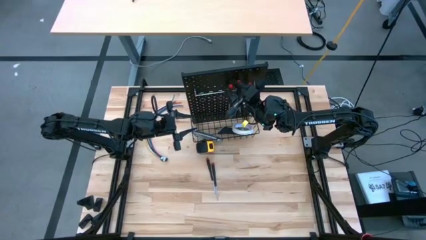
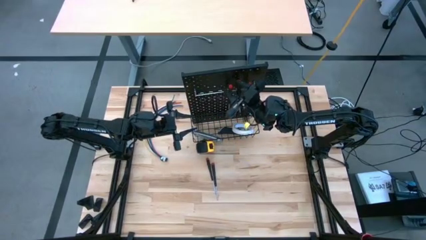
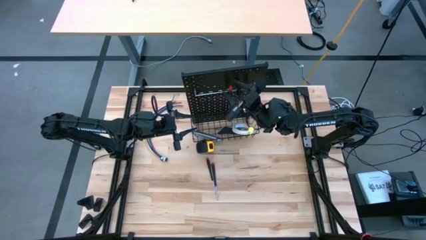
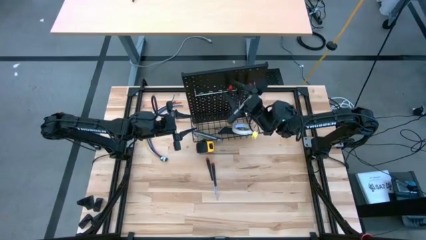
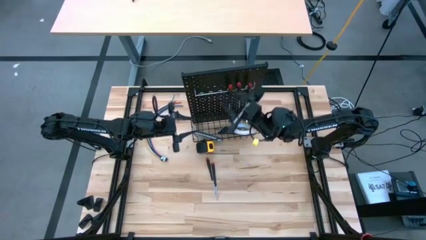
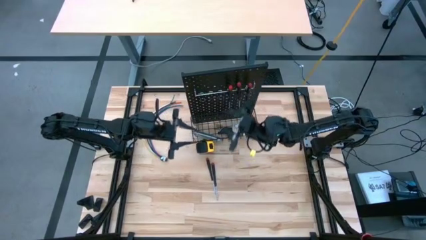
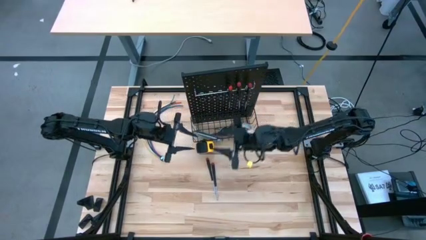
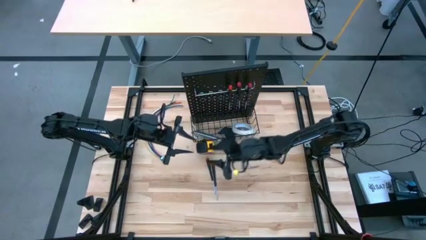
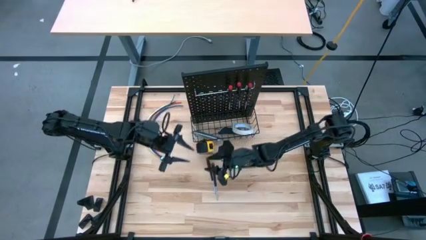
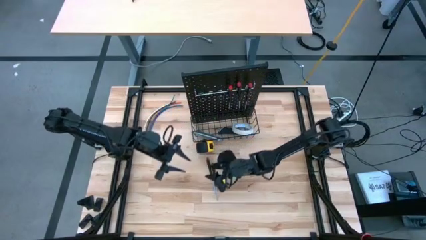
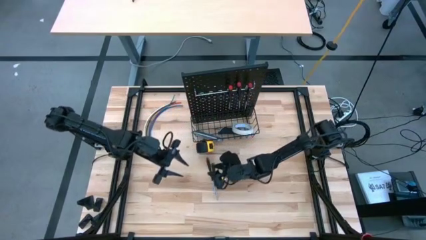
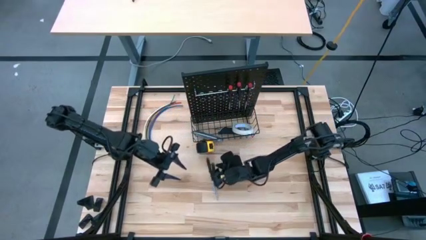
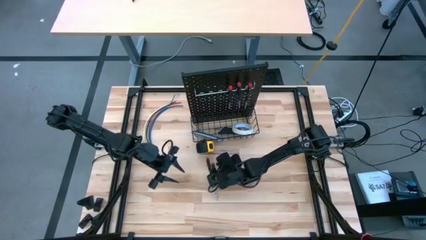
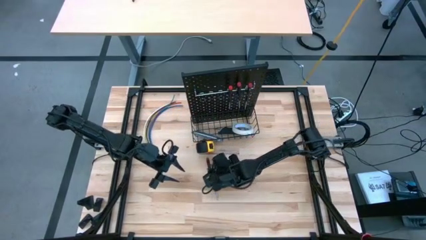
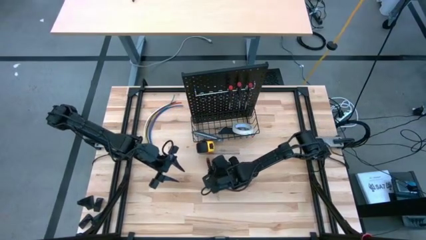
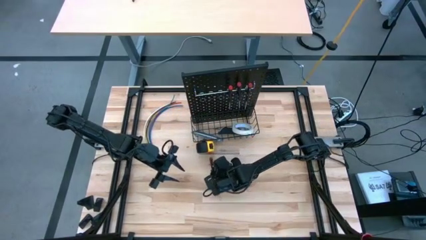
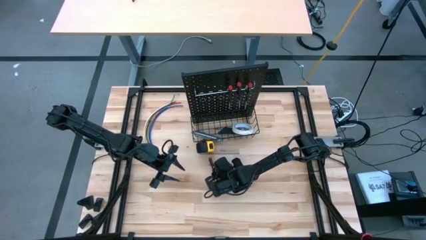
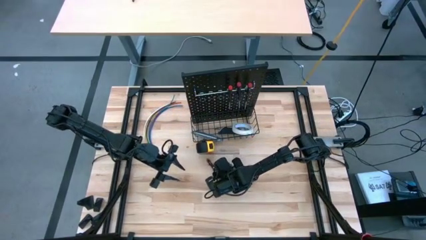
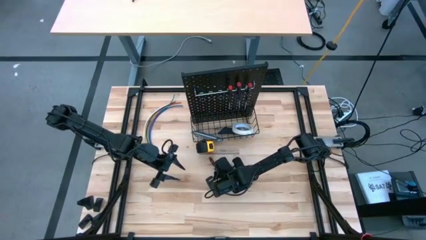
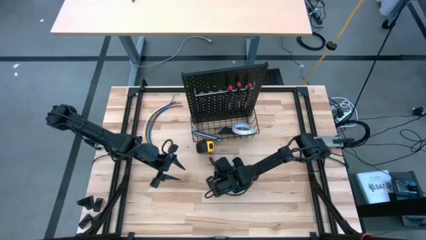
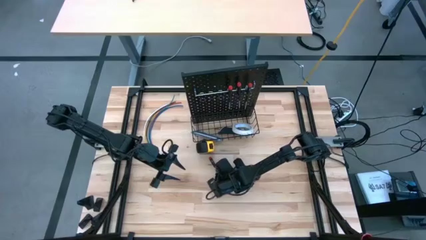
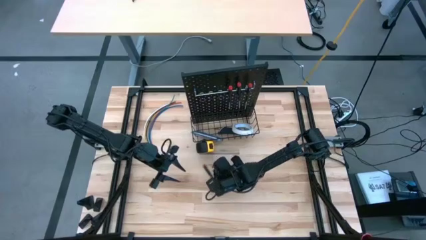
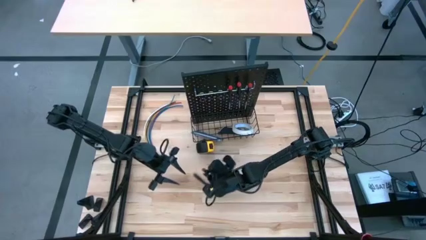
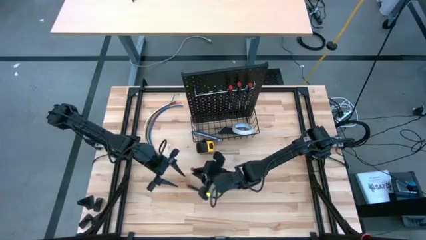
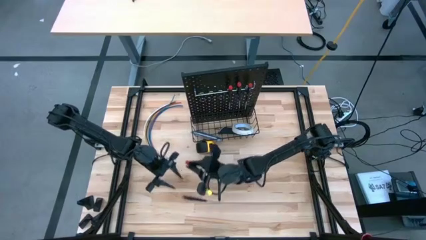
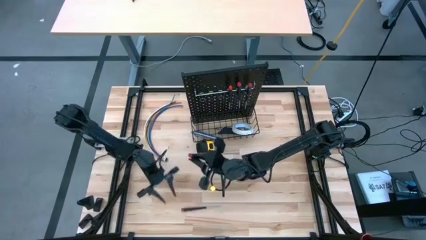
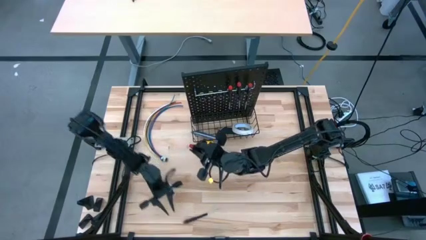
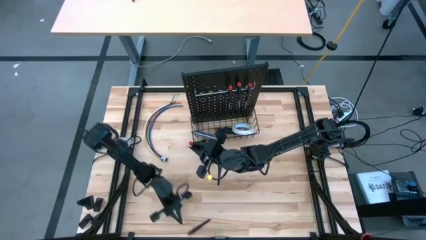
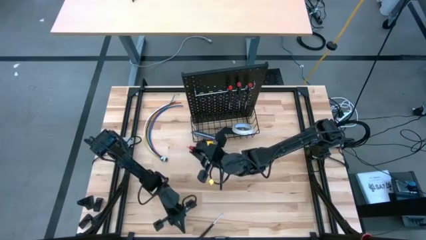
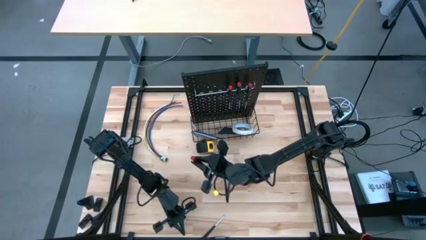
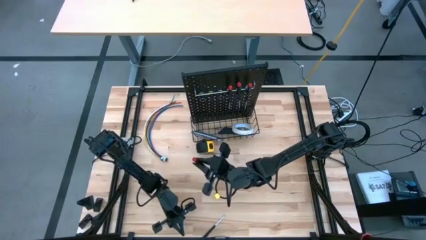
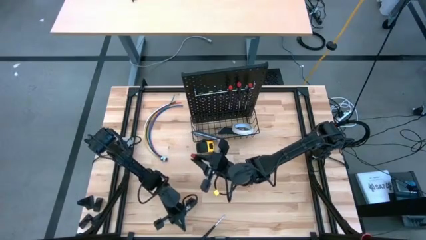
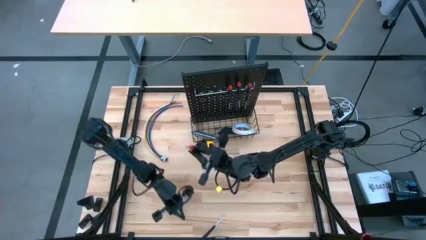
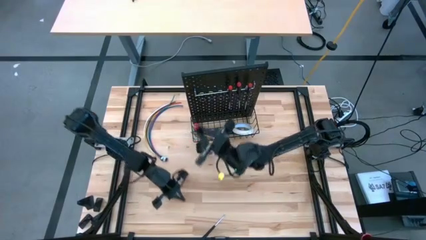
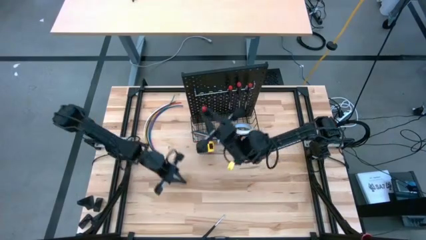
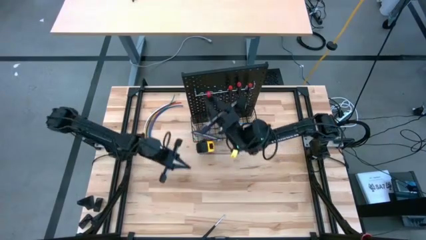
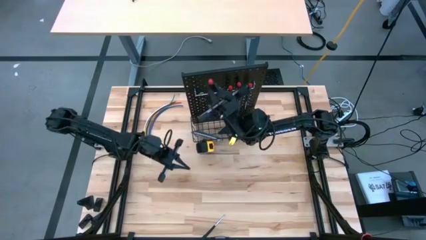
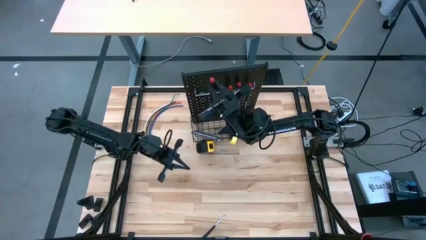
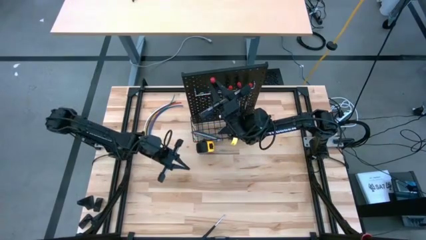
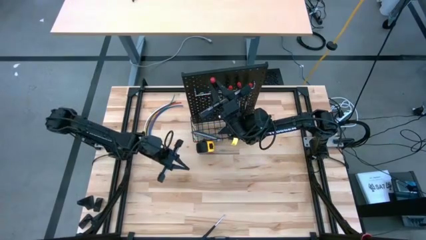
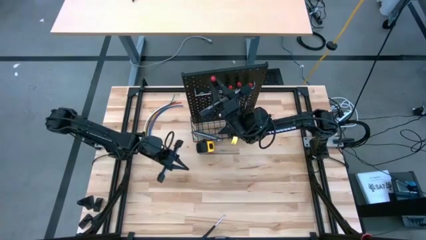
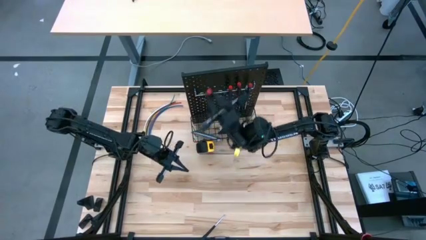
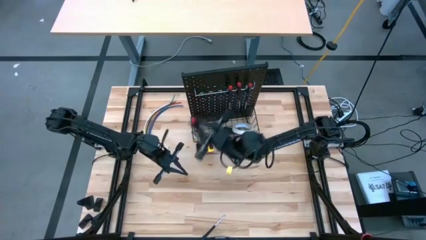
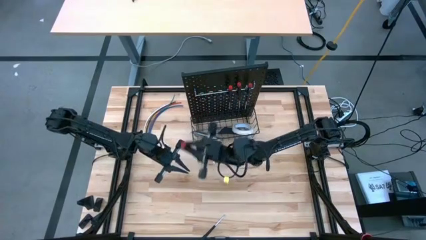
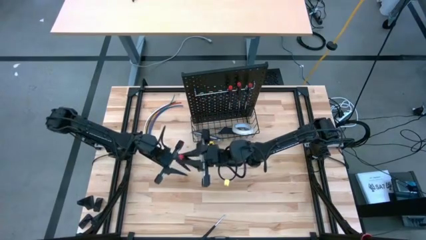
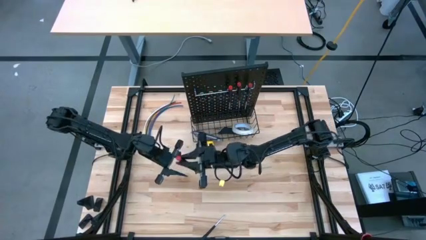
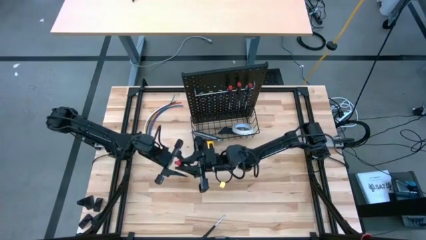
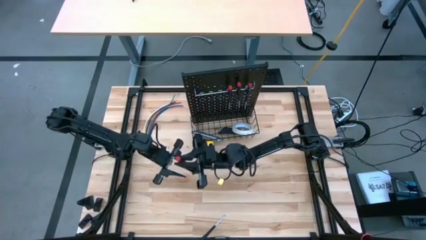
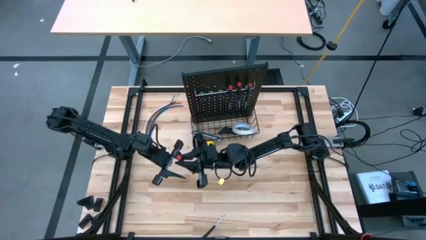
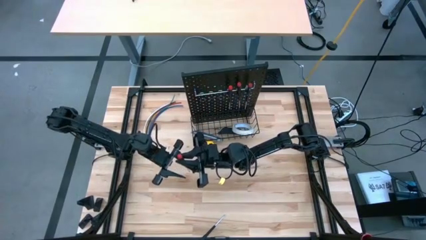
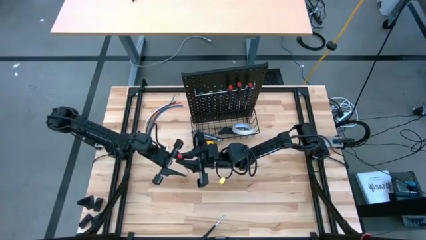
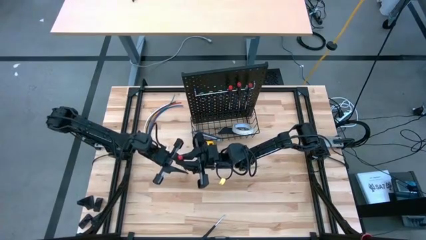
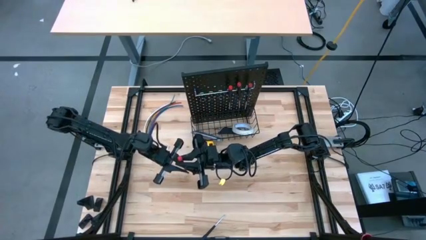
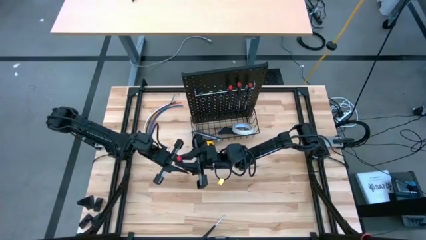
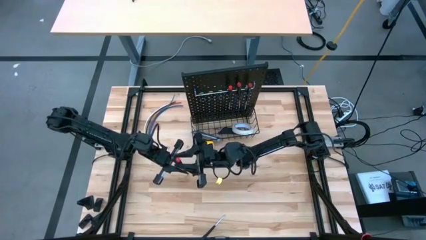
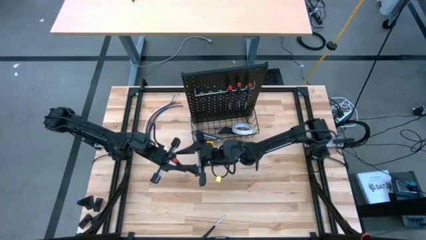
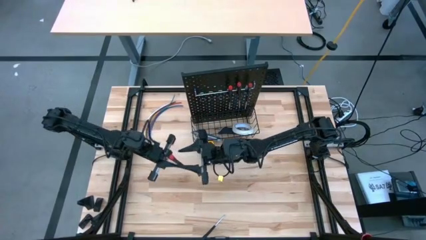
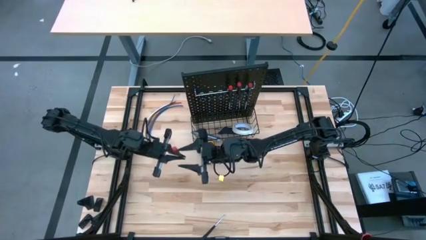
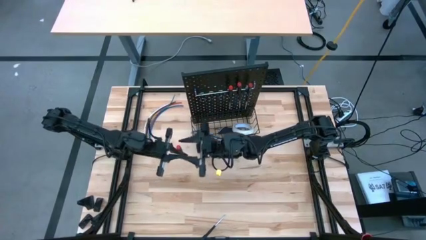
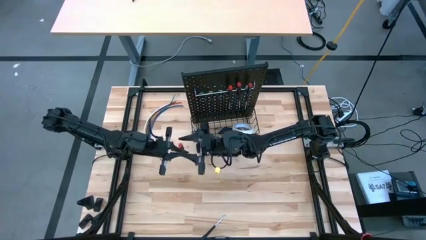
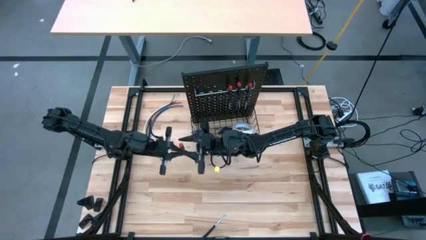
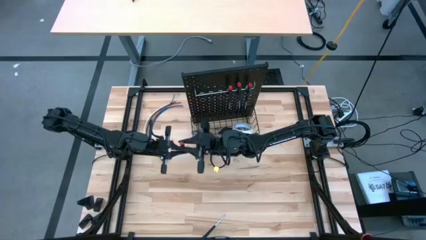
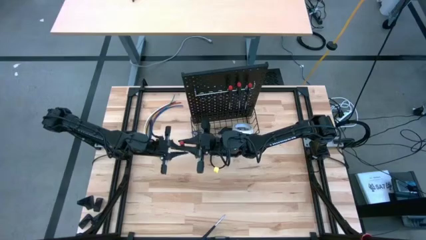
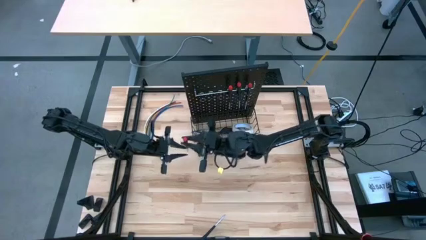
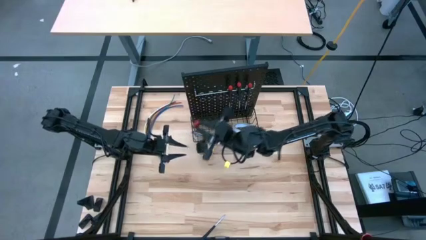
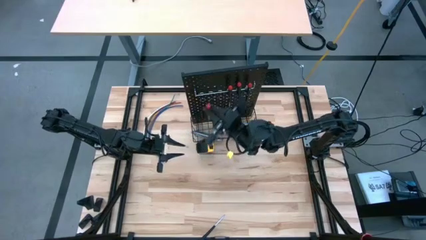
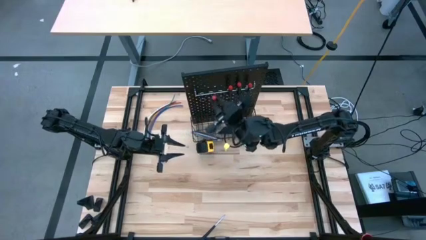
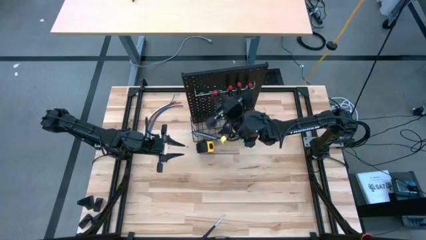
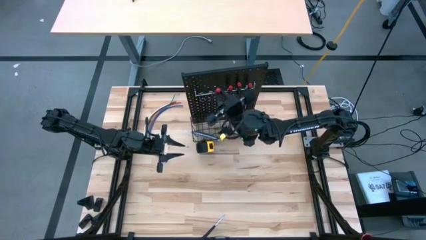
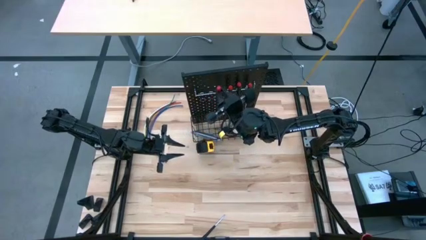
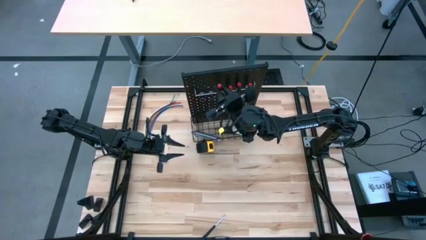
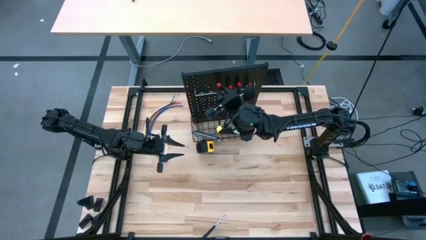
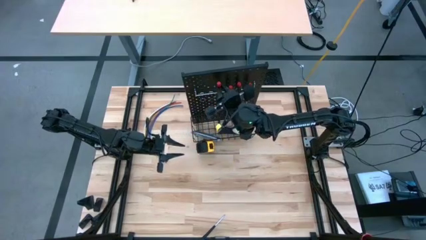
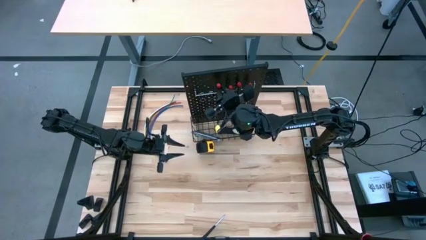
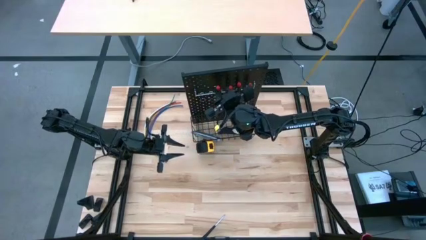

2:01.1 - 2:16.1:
Task: Hang tools onto peg board
Hang the black screwdriver onto the pegboard
